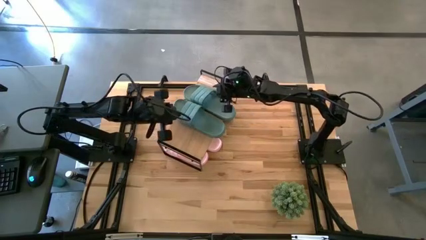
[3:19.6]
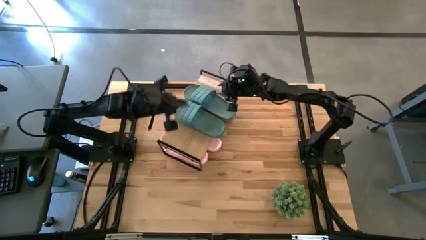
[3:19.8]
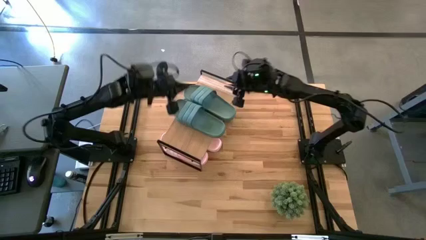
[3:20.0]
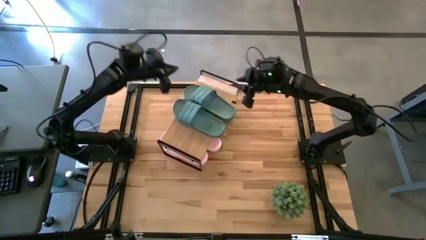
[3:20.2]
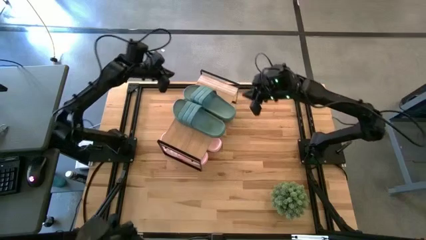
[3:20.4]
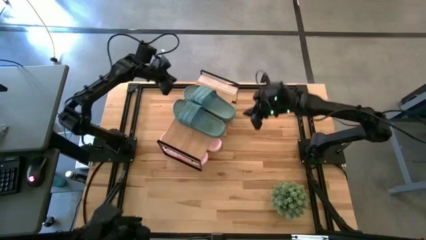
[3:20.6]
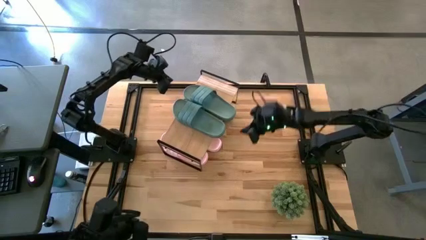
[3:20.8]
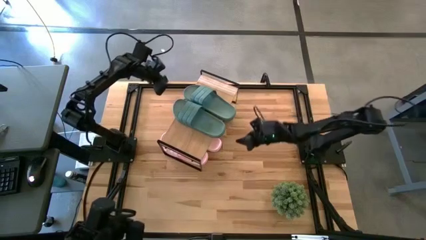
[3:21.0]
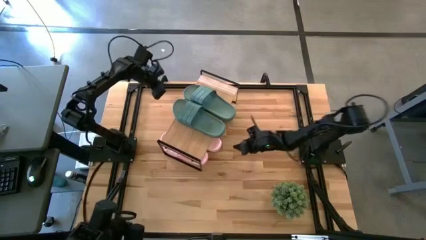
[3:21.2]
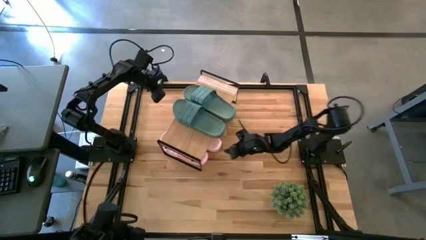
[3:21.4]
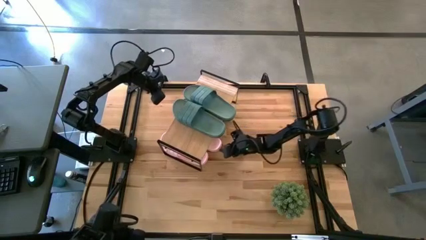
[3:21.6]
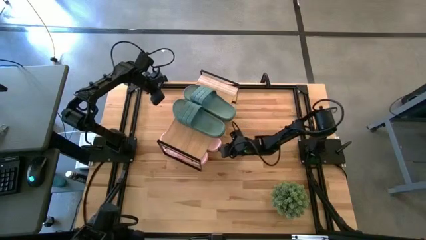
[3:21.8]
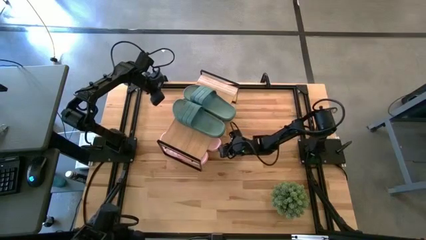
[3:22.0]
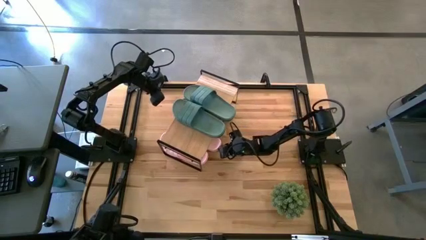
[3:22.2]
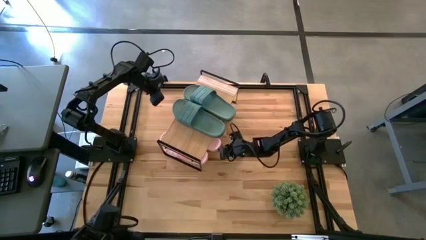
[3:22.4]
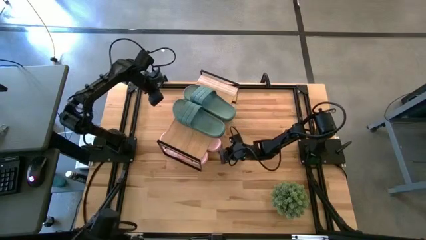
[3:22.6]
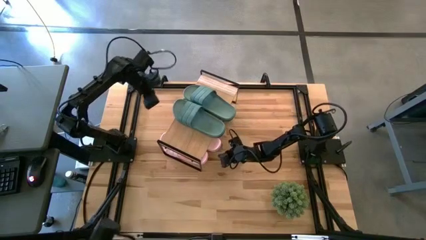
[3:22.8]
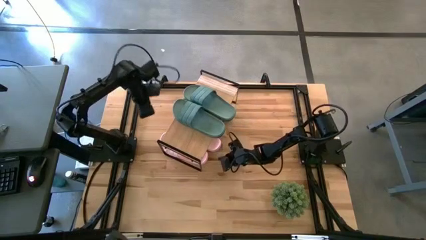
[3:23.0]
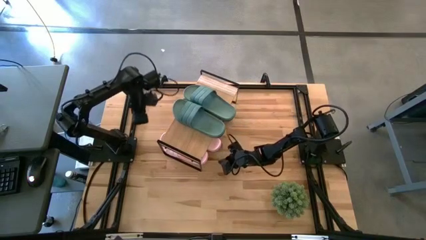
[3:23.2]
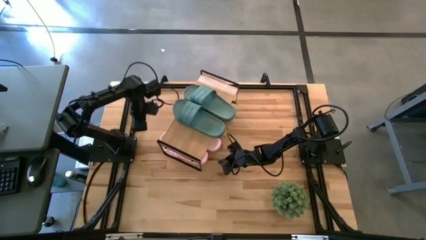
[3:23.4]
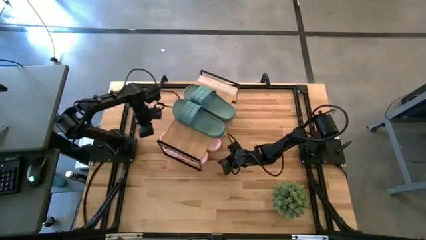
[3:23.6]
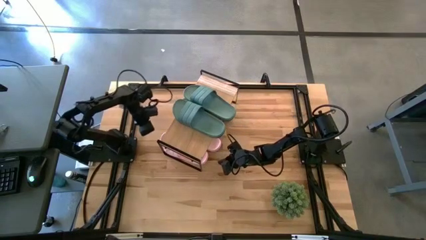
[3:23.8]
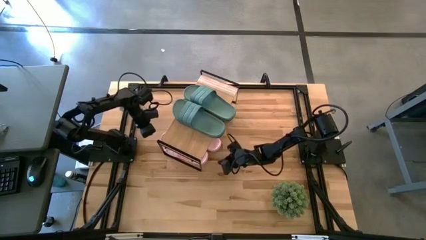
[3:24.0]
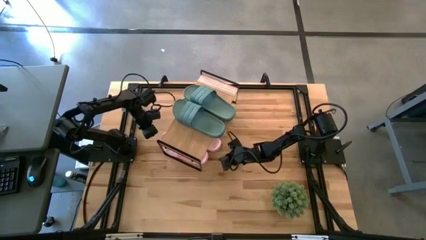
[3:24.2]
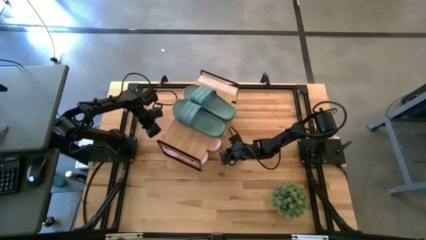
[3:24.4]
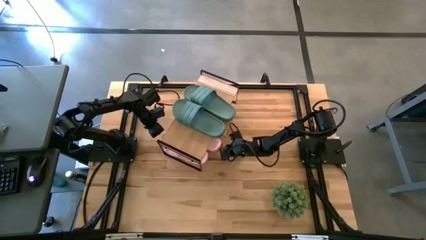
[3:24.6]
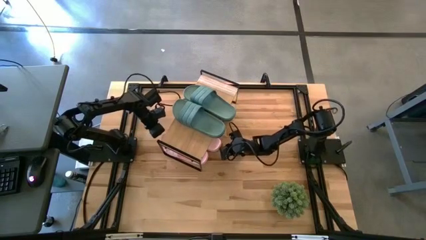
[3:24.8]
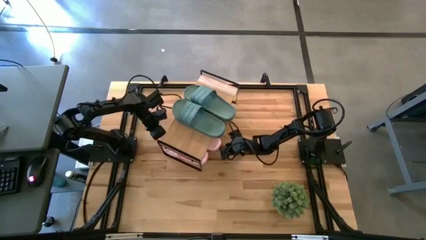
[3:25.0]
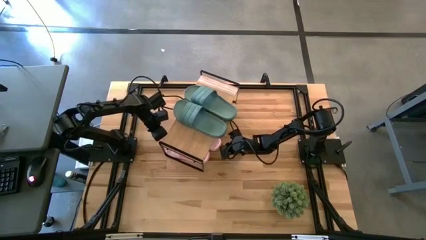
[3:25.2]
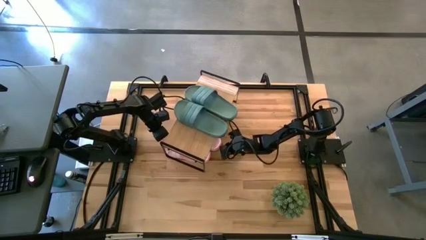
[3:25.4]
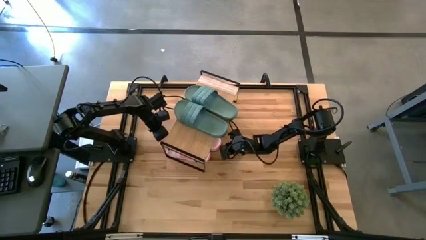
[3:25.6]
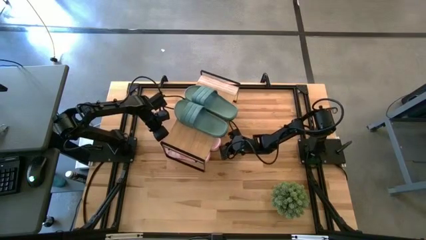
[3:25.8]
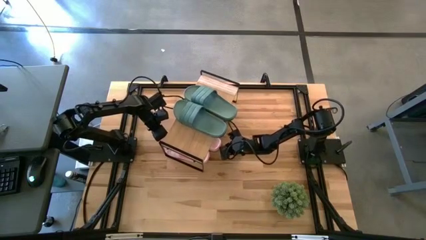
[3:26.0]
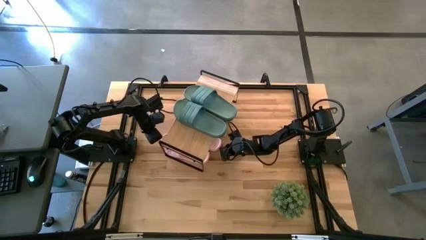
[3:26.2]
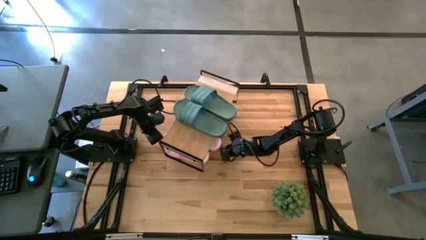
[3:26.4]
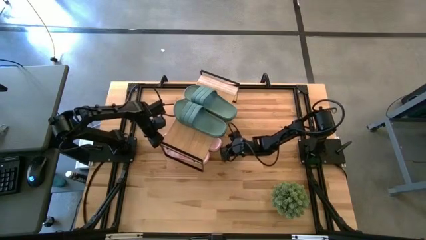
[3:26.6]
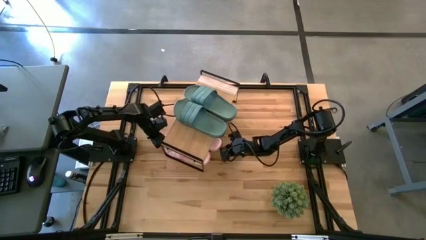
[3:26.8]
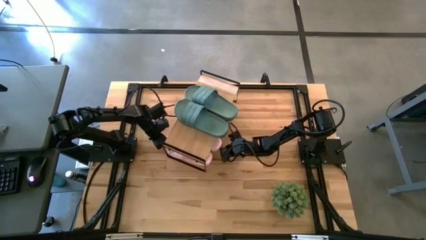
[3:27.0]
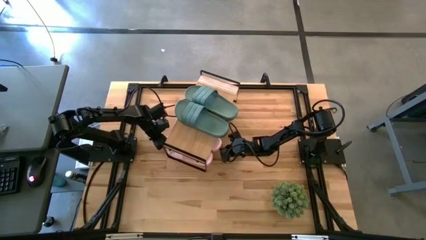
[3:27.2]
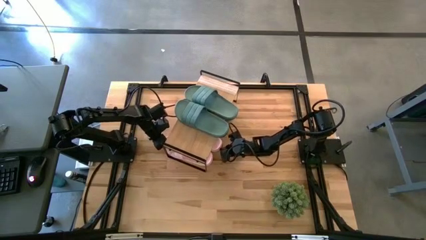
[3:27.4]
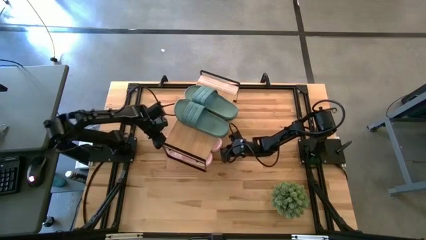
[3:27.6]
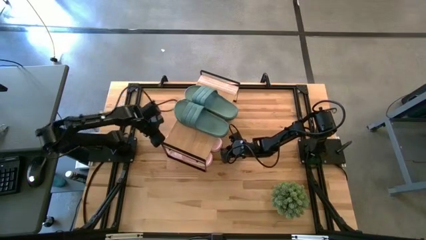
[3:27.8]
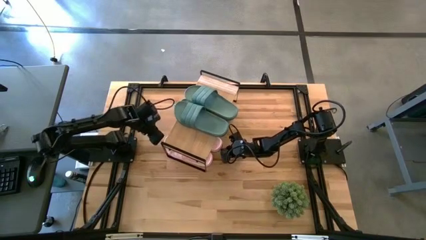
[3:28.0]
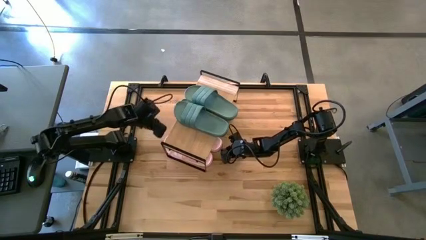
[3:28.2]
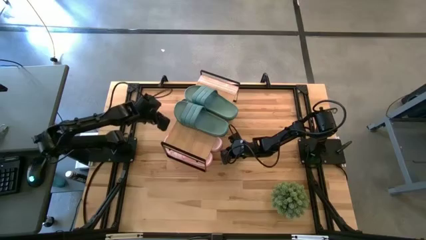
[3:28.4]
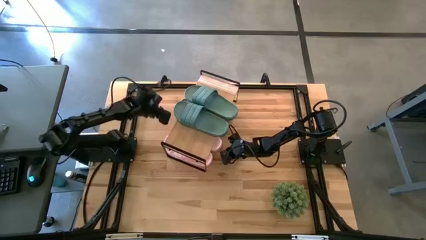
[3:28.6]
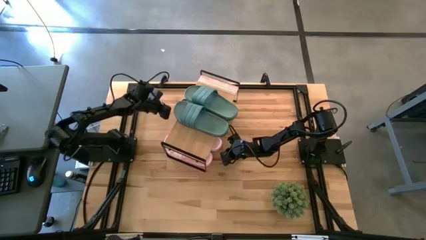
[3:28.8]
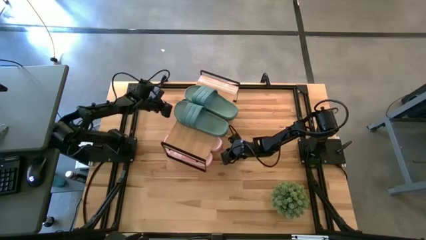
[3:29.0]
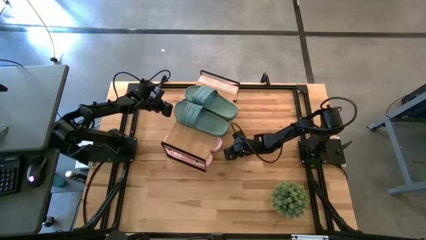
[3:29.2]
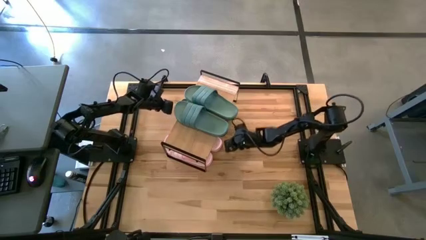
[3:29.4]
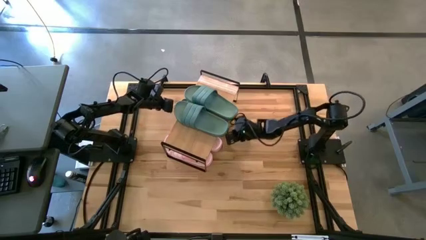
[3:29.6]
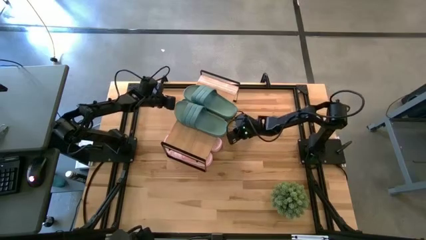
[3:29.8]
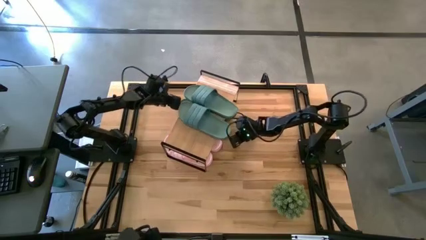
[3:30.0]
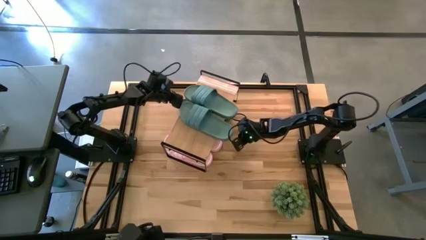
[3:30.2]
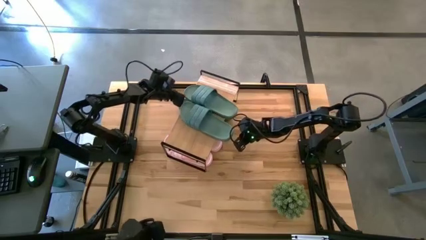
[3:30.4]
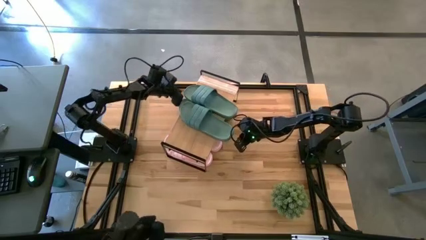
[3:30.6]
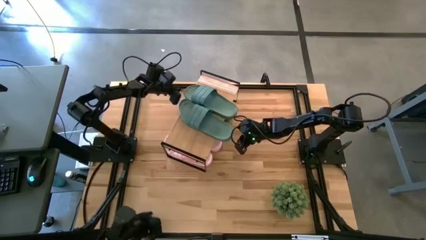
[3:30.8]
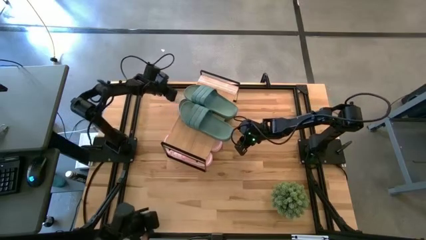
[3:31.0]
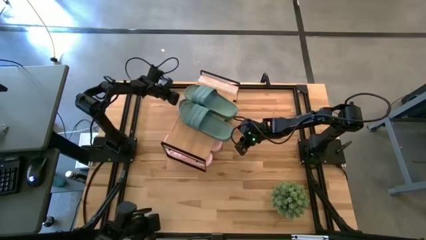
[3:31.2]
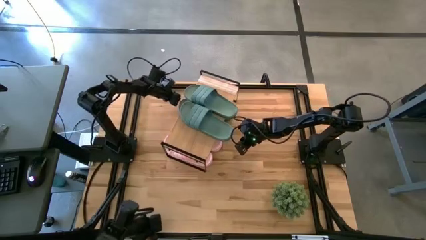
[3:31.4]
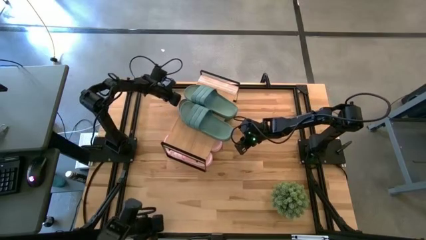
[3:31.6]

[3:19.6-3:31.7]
Task: Pick and place slides into the shelf
Adjust the slides under the shelf

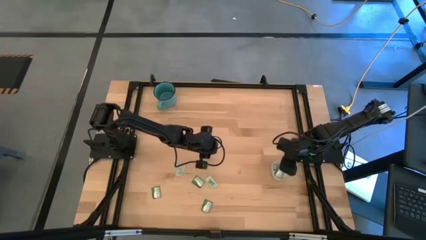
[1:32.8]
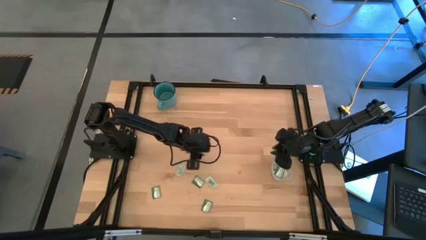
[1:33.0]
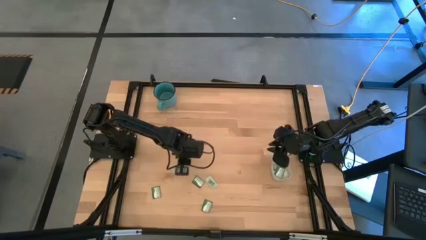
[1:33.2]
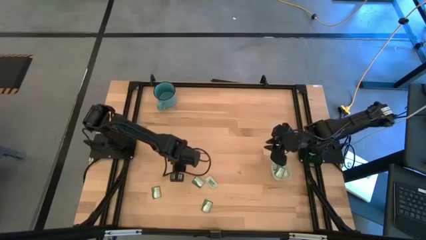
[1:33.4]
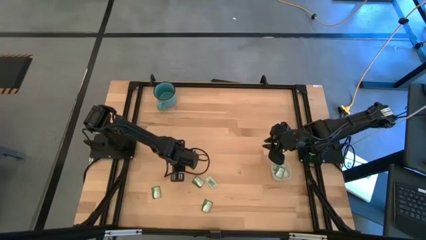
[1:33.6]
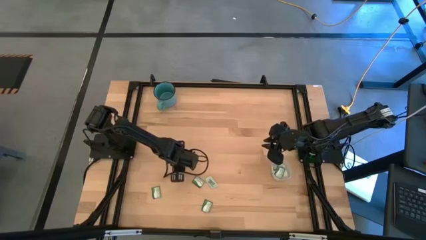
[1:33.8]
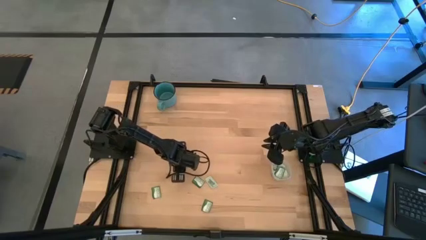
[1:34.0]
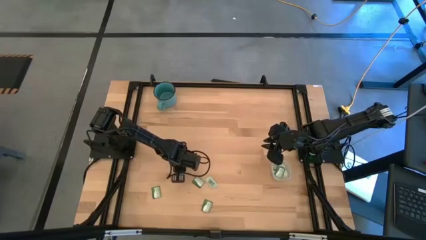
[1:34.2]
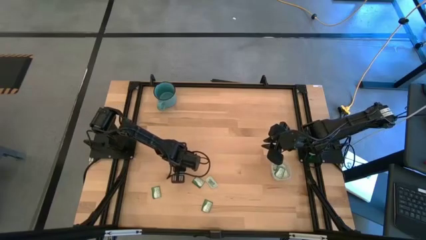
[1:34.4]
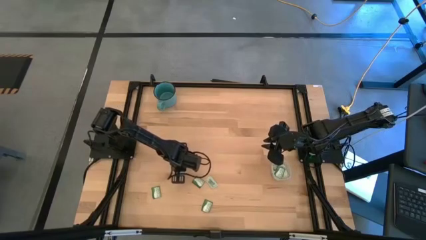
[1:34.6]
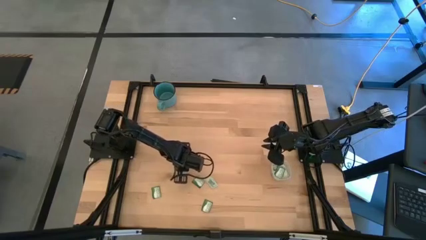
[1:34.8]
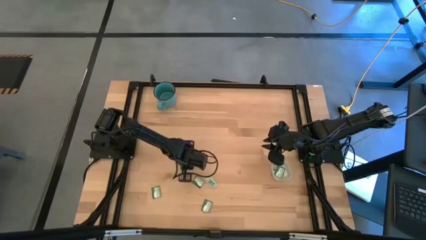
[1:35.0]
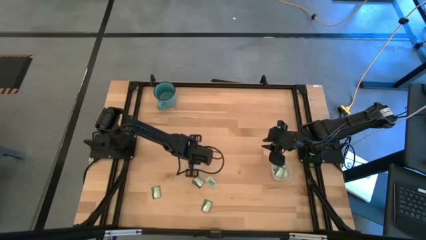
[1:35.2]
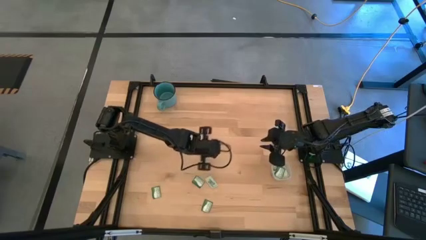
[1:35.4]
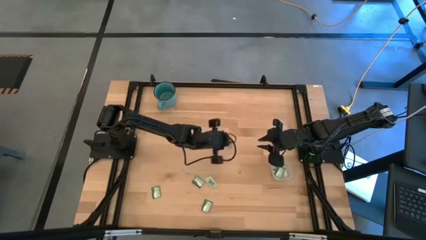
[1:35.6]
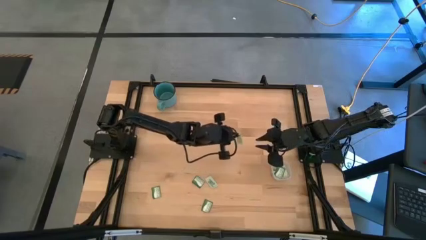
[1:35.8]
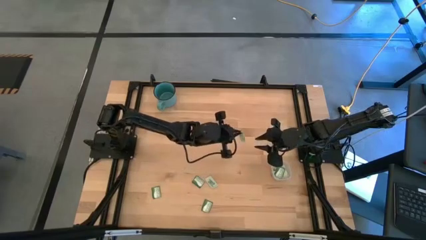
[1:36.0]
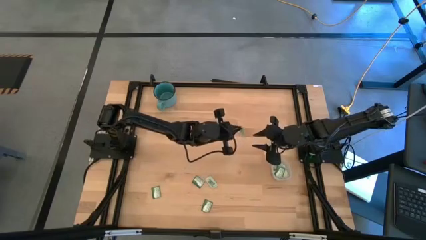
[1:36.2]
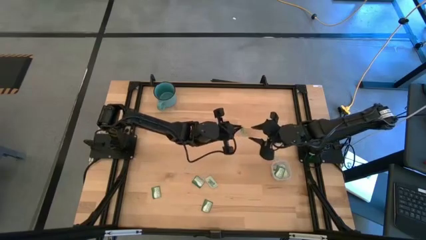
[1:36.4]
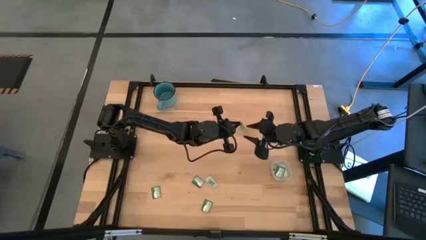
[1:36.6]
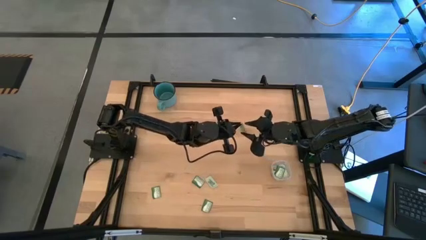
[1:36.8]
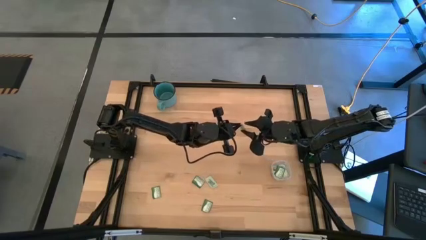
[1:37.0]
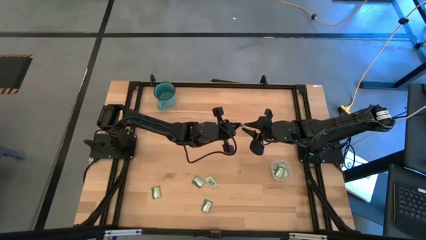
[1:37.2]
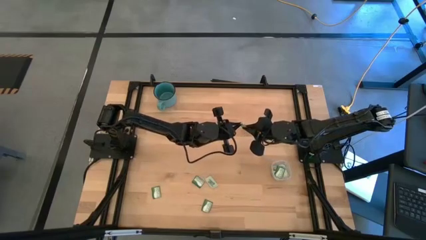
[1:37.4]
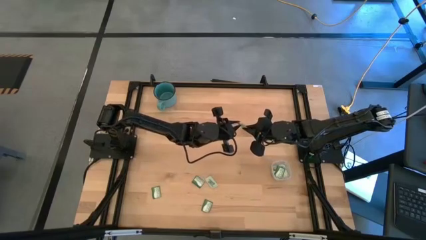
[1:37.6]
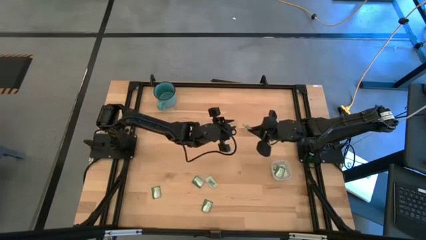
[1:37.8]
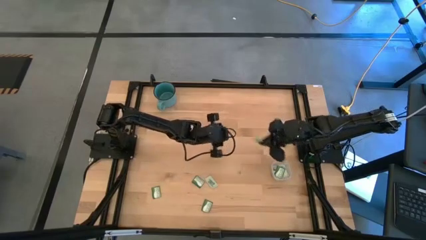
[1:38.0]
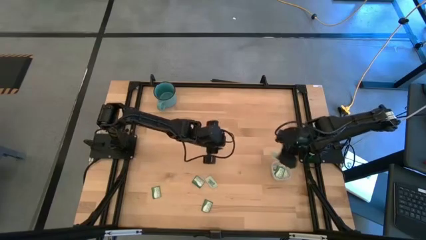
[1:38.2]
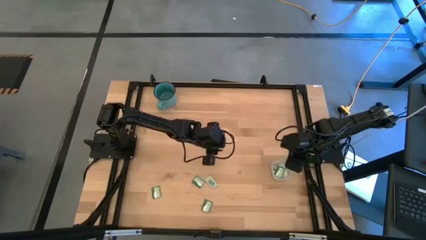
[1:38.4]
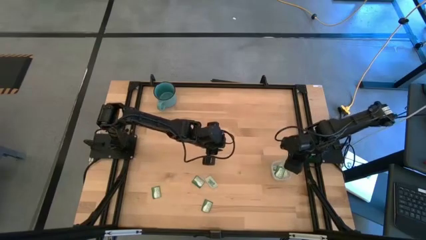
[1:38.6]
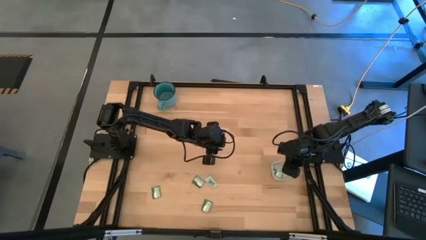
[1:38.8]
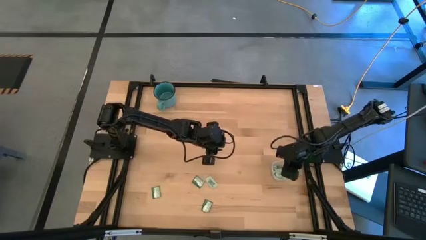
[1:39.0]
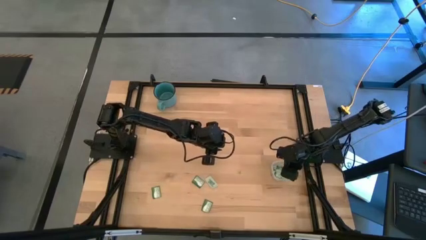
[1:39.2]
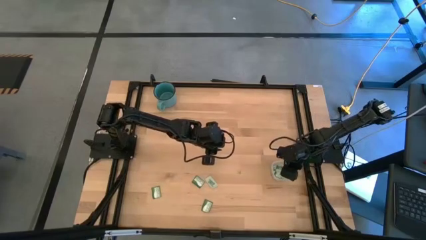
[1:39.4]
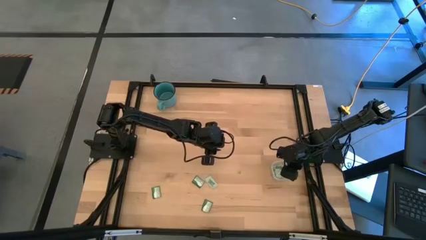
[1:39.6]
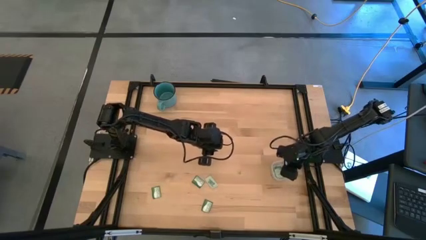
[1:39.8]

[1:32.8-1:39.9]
Task: Pick and place items into bin
Put the white stevia packet into the transparent bin
